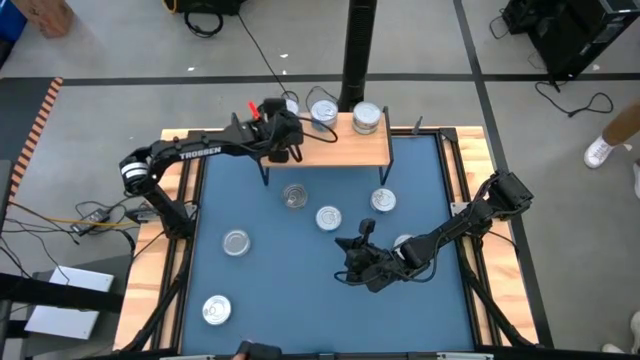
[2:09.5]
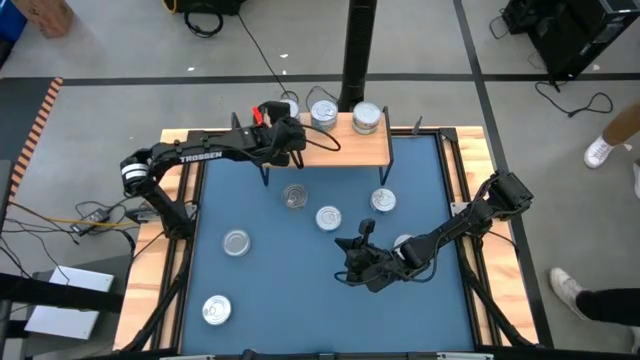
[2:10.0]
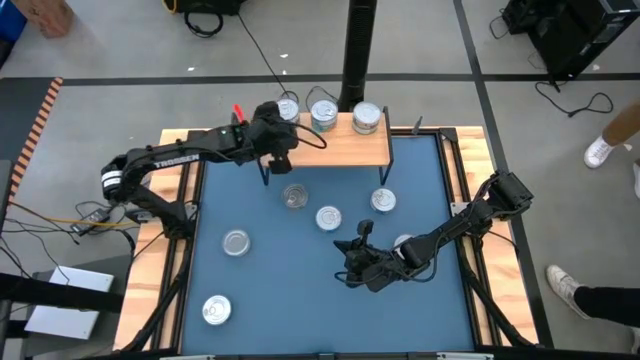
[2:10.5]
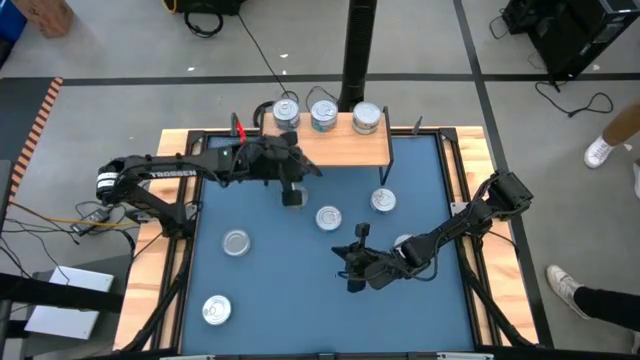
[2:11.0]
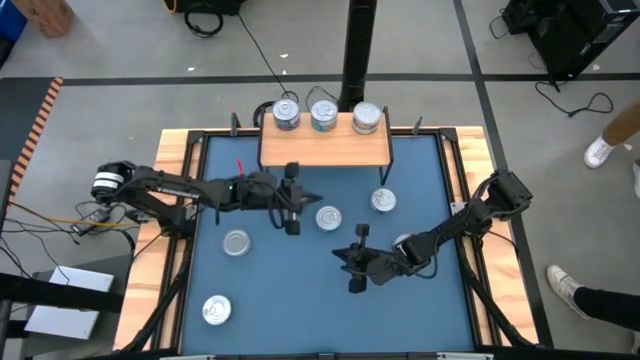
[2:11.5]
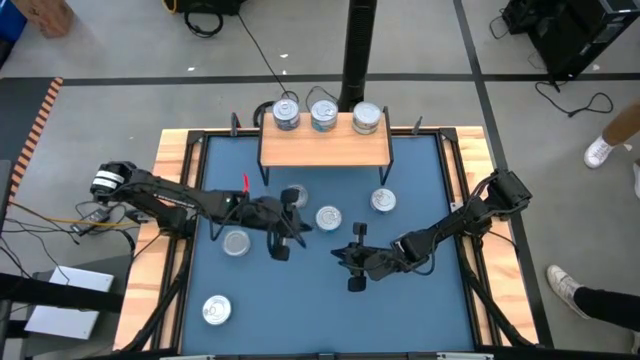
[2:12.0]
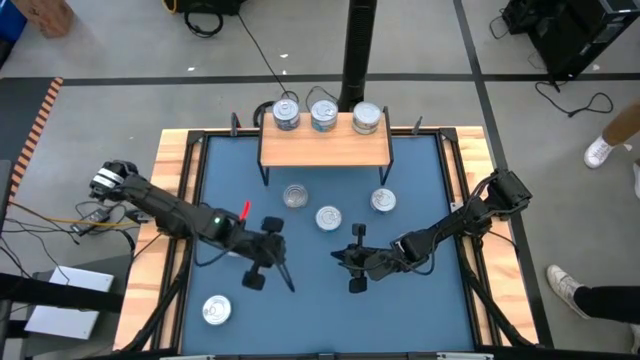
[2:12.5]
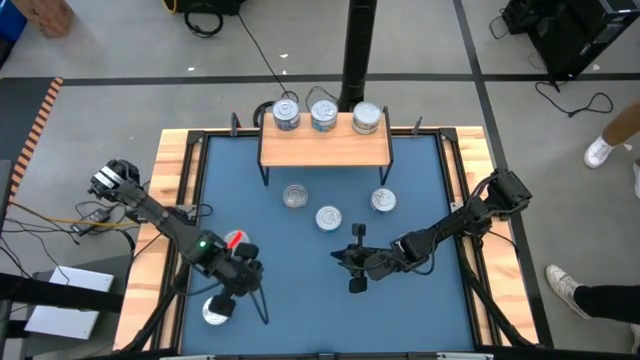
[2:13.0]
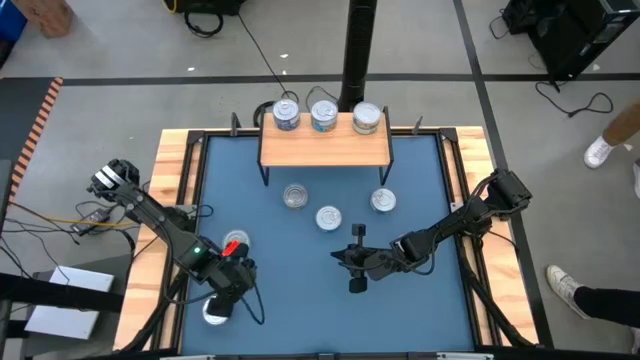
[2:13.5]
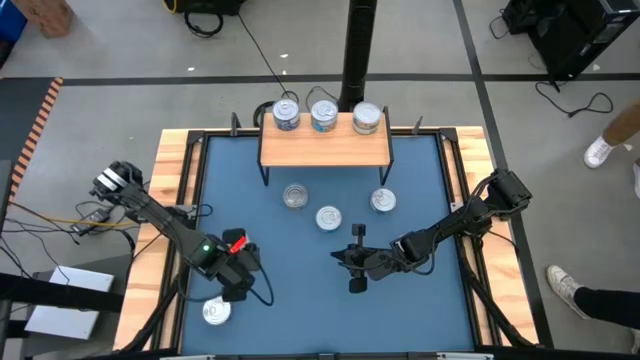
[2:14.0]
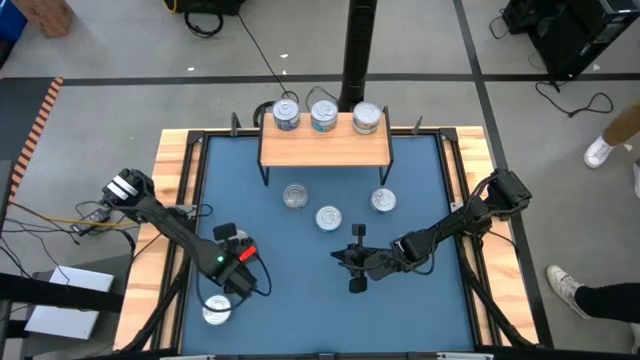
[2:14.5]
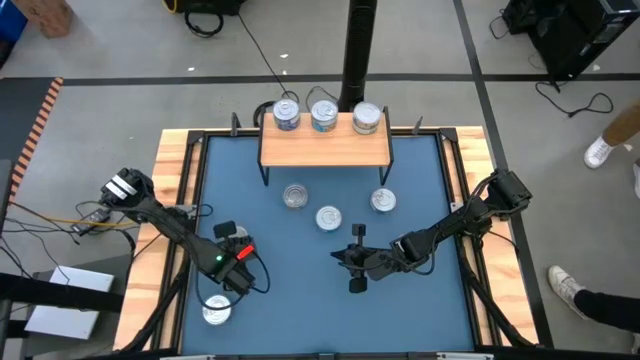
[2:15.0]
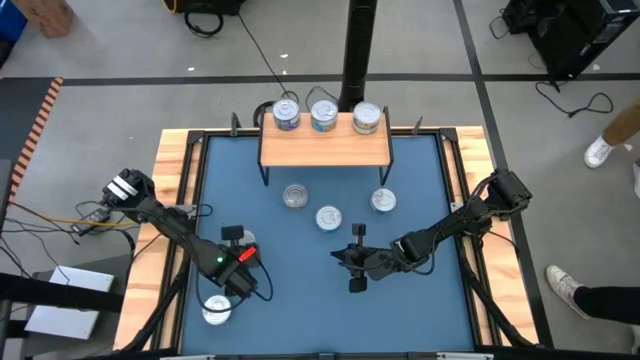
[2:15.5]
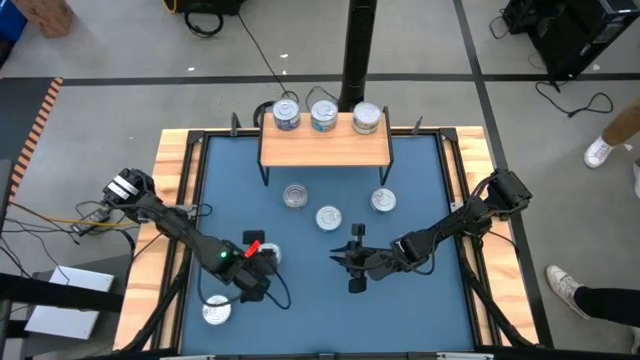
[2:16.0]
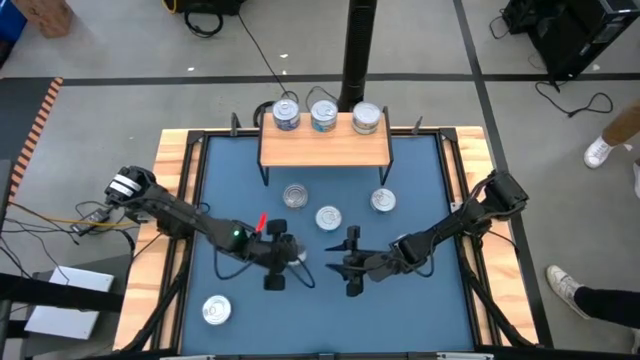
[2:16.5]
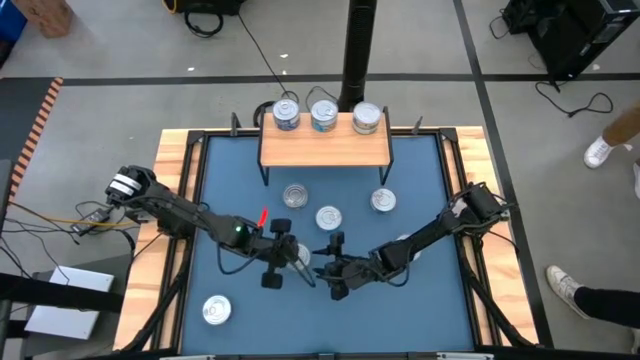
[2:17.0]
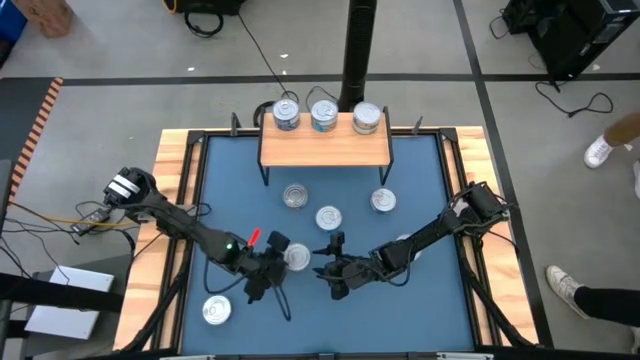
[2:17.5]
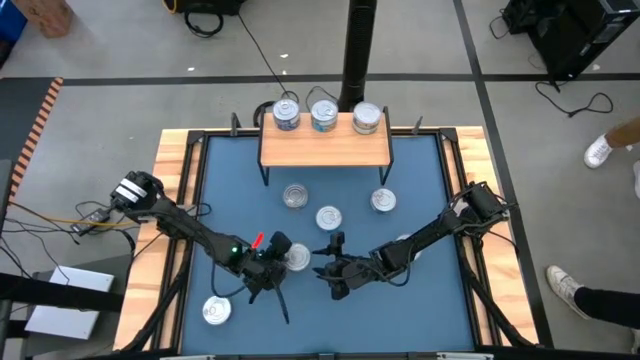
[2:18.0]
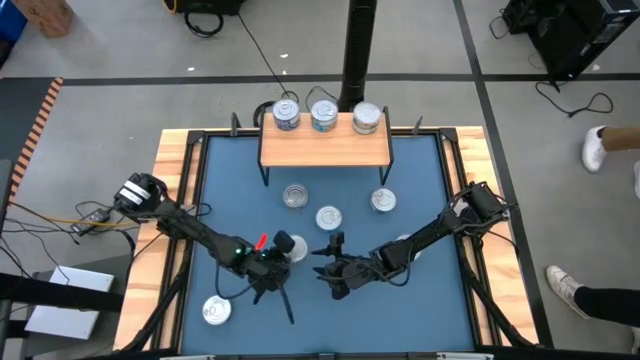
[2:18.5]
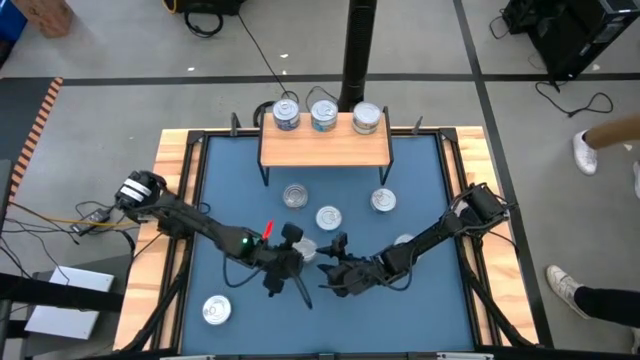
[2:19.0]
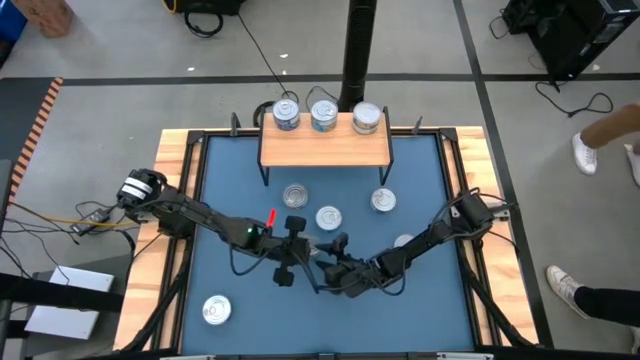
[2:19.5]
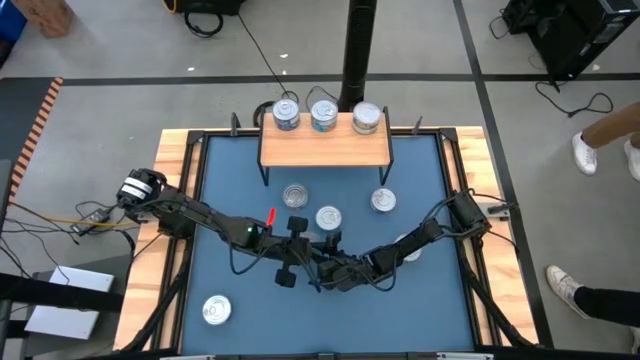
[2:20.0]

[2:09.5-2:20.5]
Task: Stack canned seafood by type on shelf
Put the green tuna can on the shelf aligned with the other green tuna can

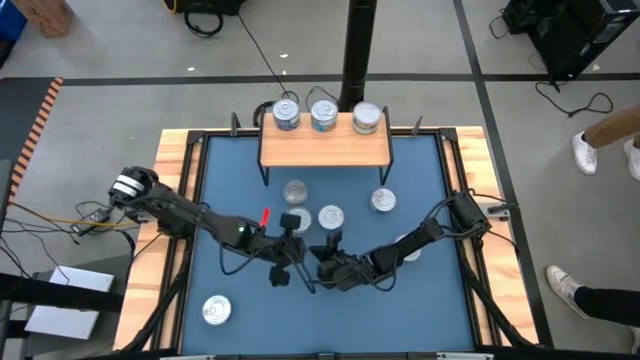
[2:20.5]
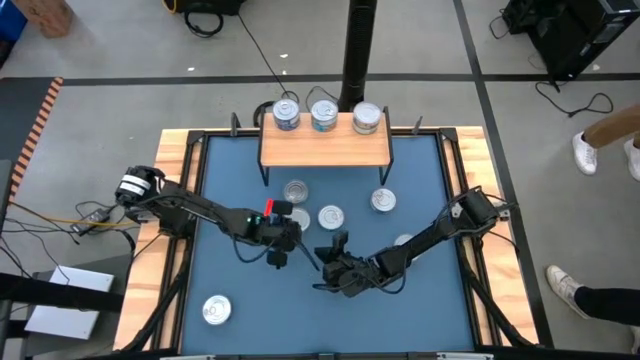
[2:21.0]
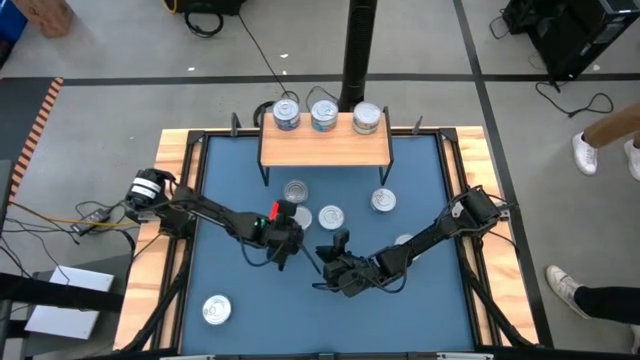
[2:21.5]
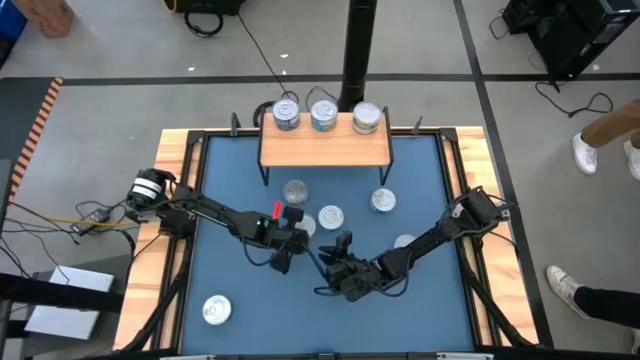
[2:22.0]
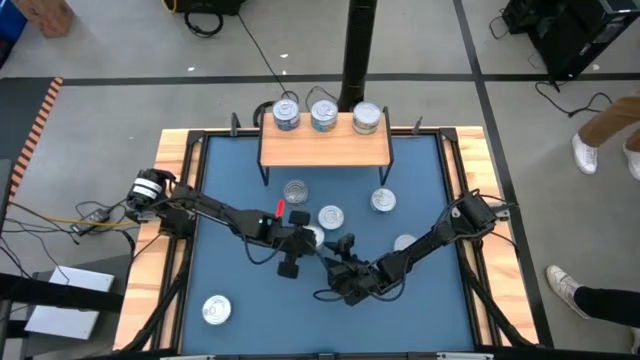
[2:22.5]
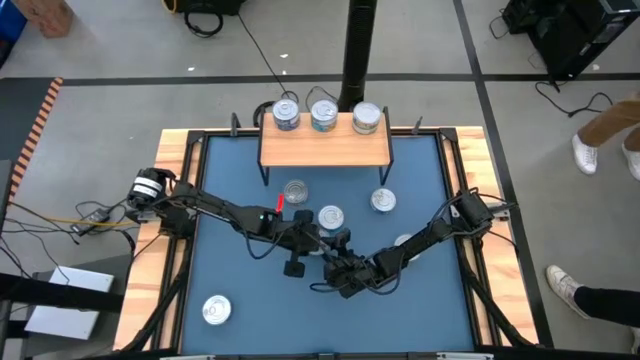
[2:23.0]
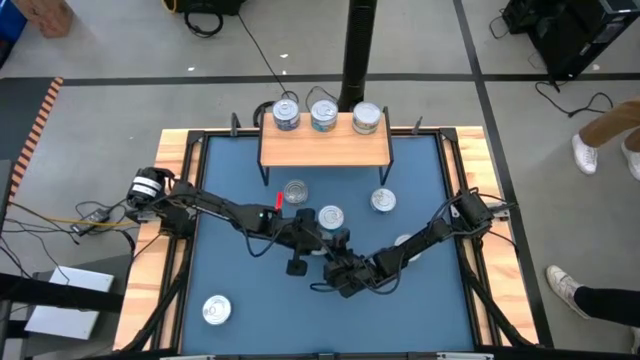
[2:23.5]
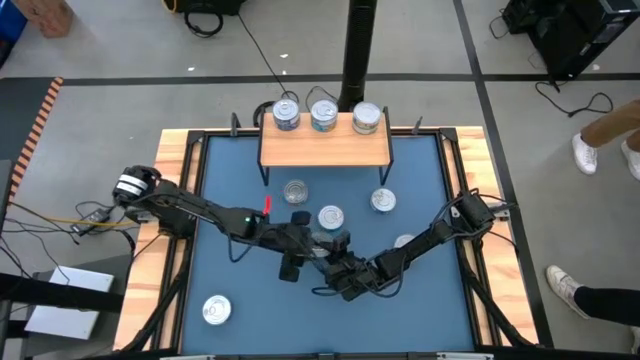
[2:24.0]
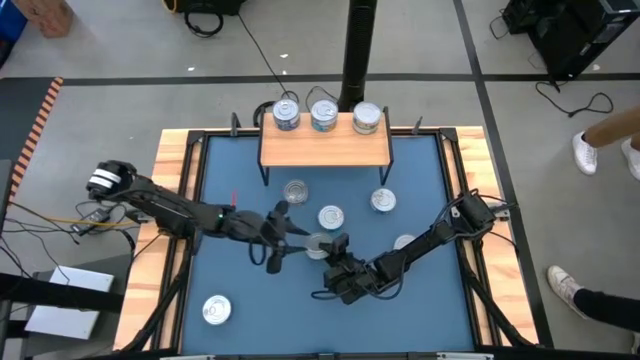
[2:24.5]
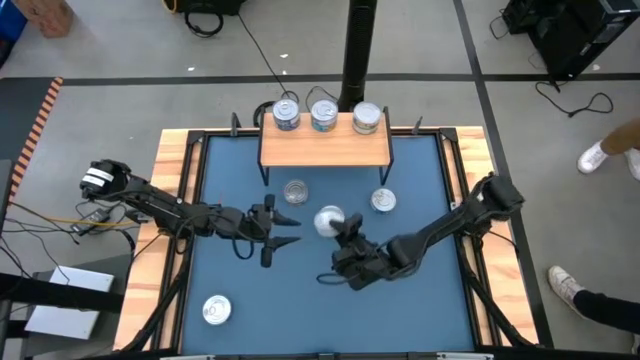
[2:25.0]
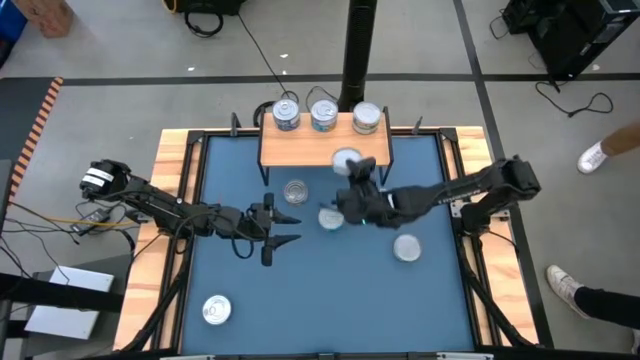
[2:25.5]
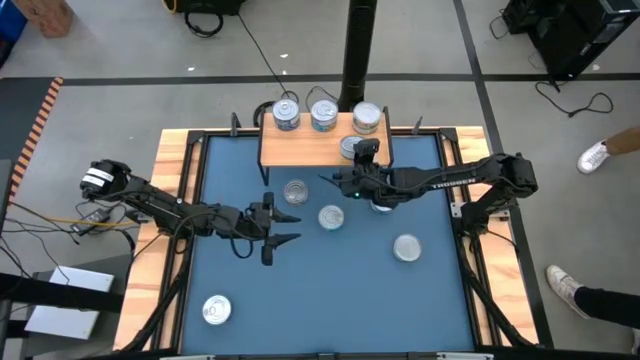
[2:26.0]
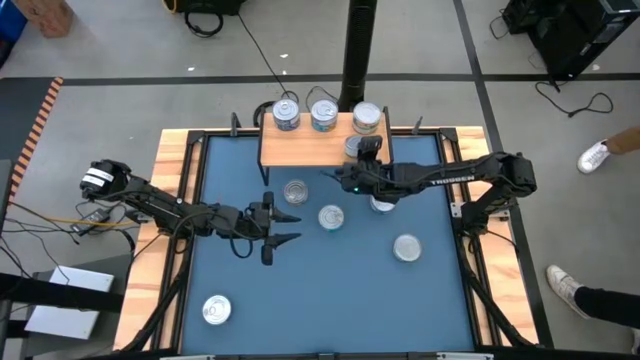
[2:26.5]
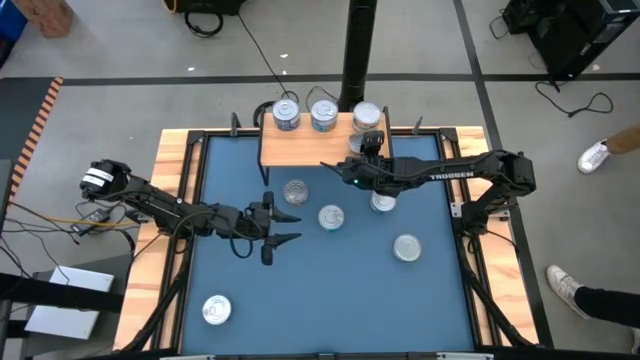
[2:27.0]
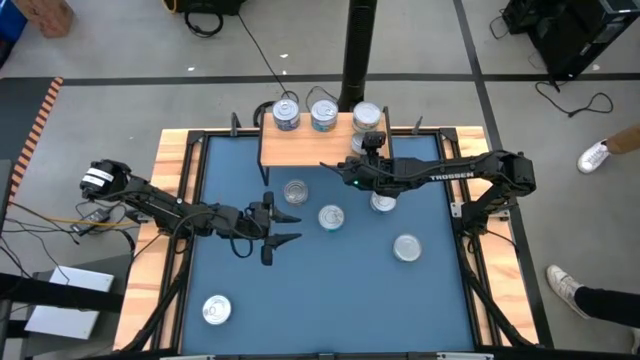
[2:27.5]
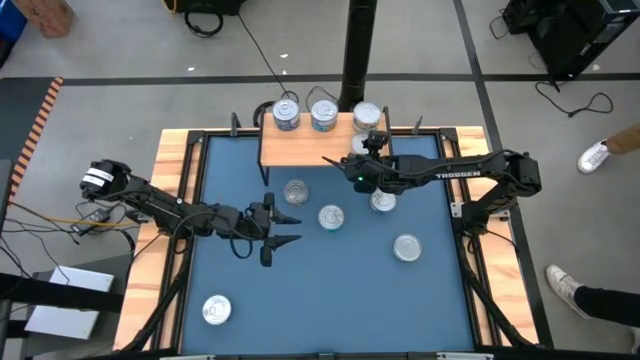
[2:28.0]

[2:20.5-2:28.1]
Put the green tuna can on the shelf aligned with the other green tuna can

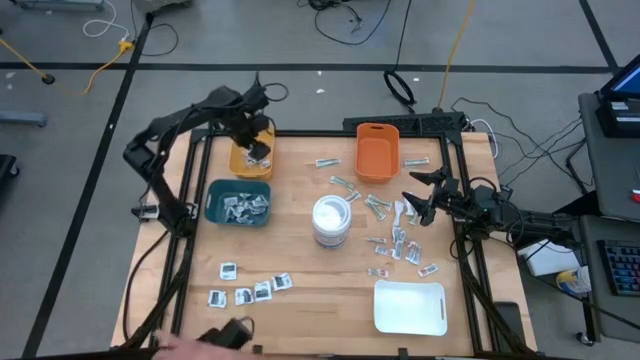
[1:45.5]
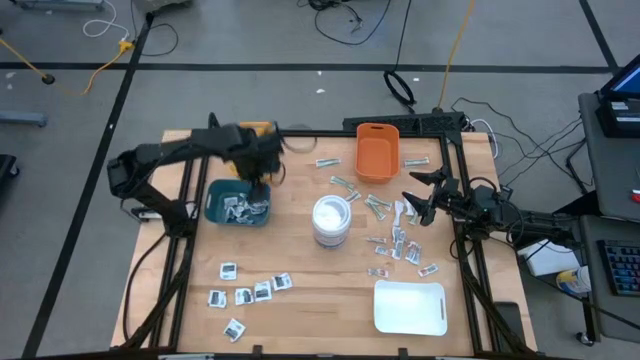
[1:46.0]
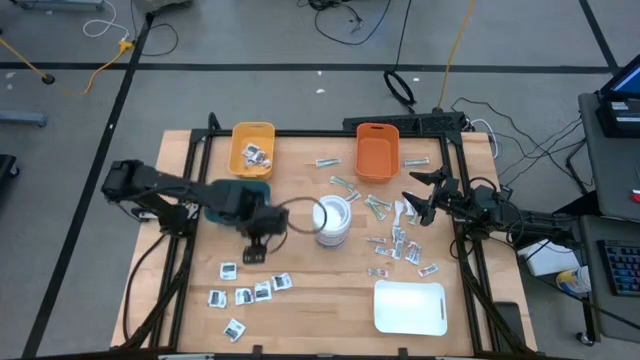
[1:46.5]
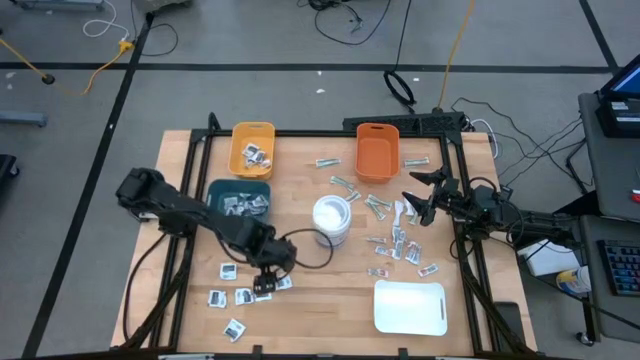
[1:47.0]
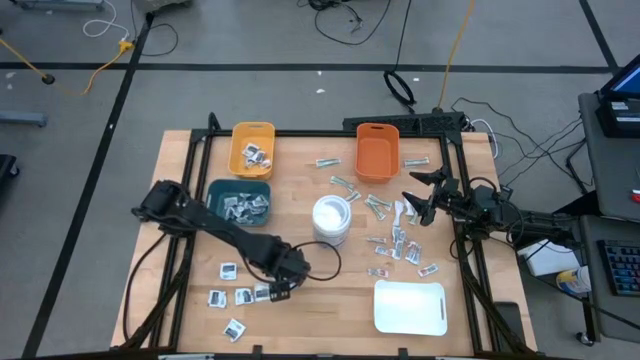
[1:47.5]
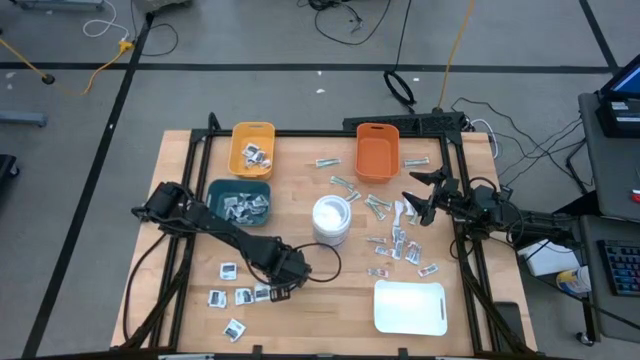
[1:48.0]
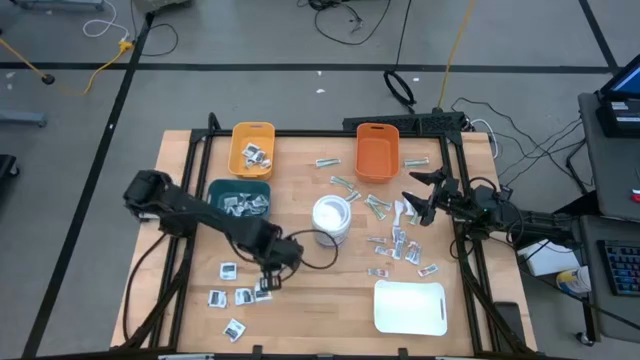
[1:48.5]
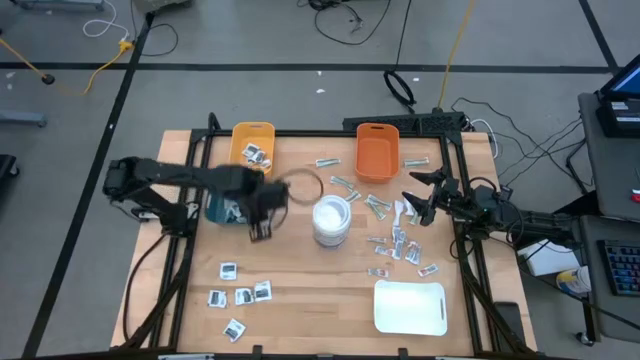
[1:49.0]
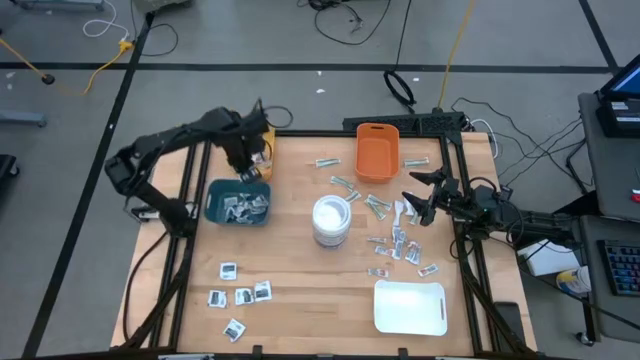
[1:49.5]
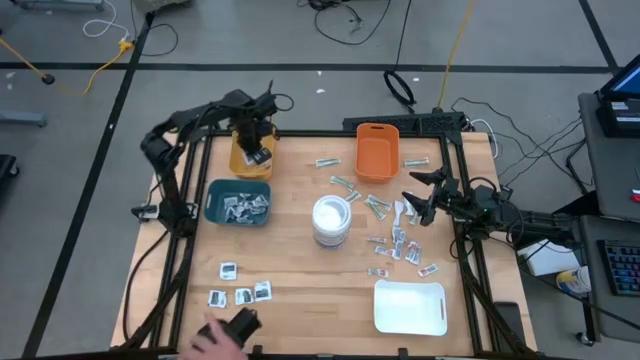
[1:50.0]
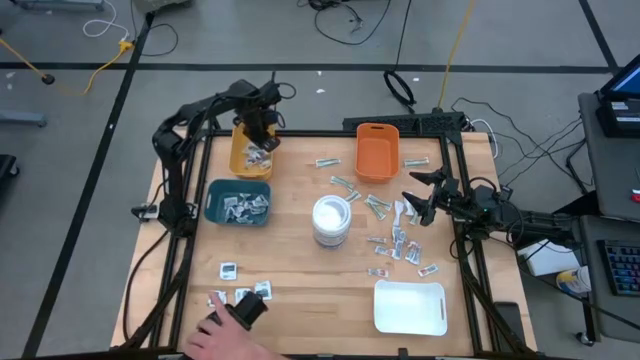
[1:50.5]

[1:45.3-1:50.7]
Task: Pick & Place First Aid Supplies
Put the black pad into the yellow bin
